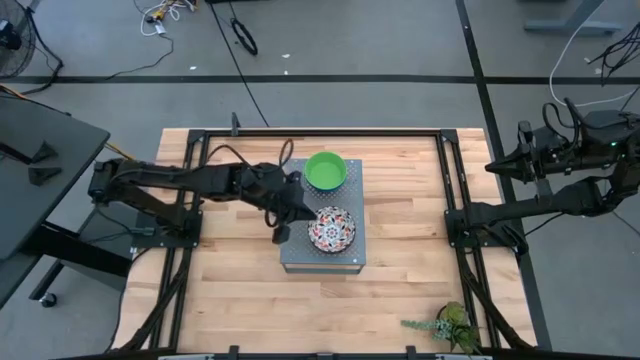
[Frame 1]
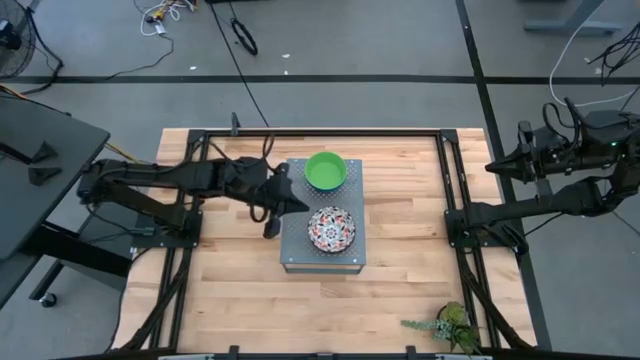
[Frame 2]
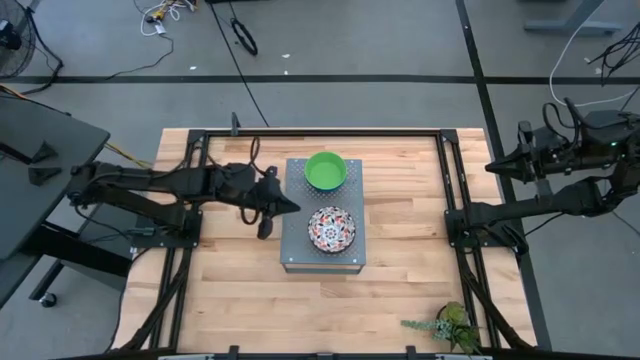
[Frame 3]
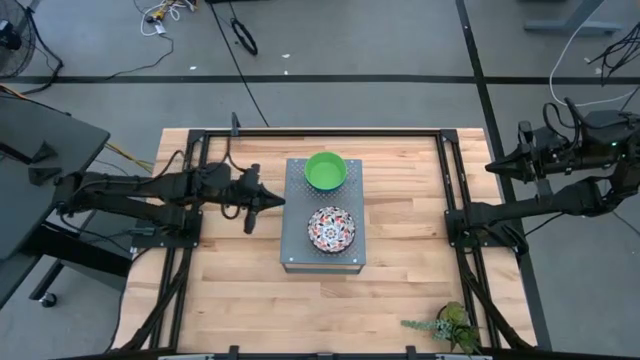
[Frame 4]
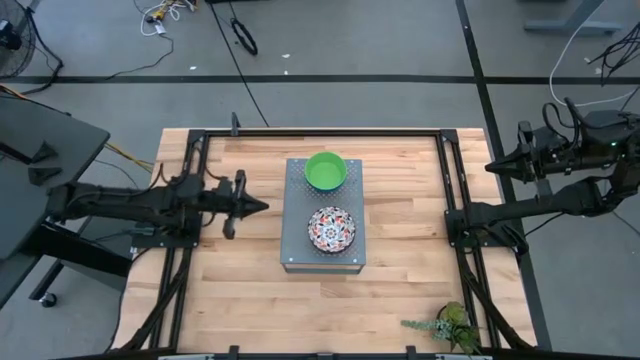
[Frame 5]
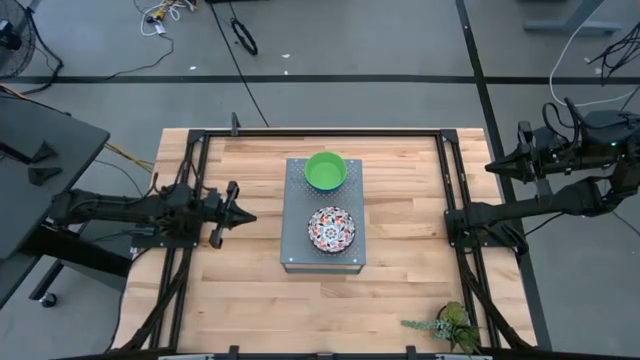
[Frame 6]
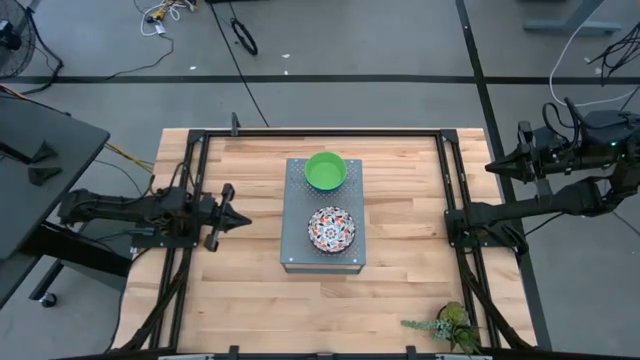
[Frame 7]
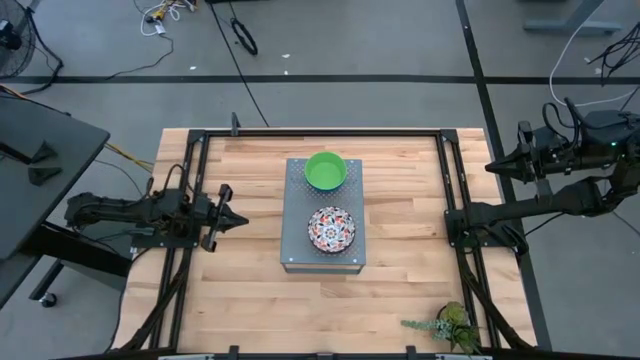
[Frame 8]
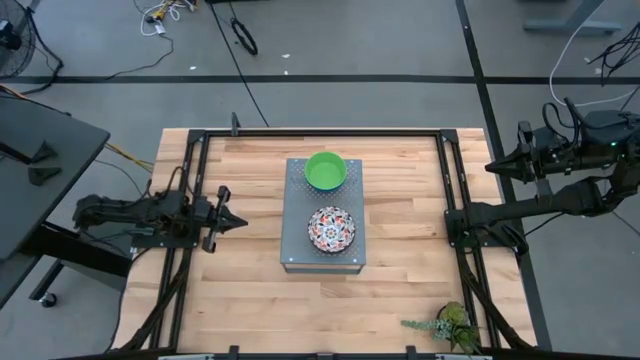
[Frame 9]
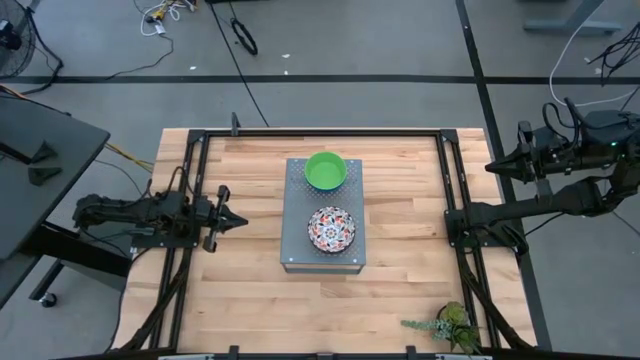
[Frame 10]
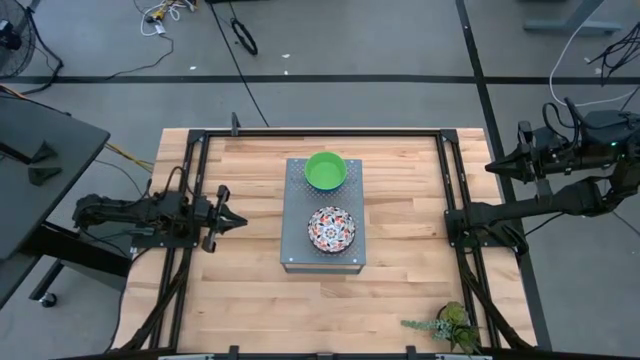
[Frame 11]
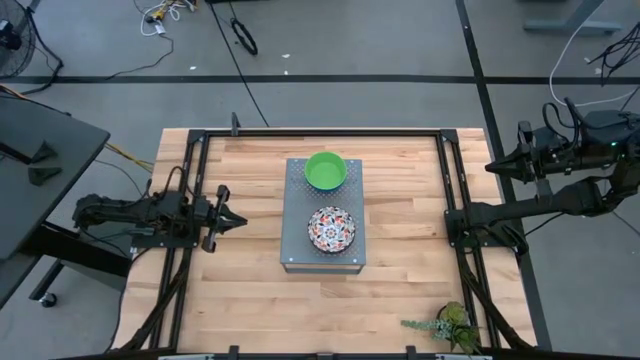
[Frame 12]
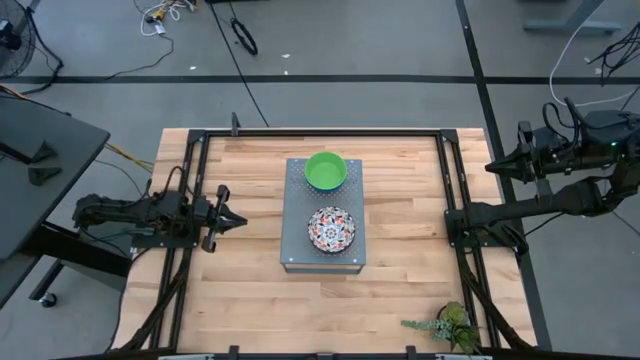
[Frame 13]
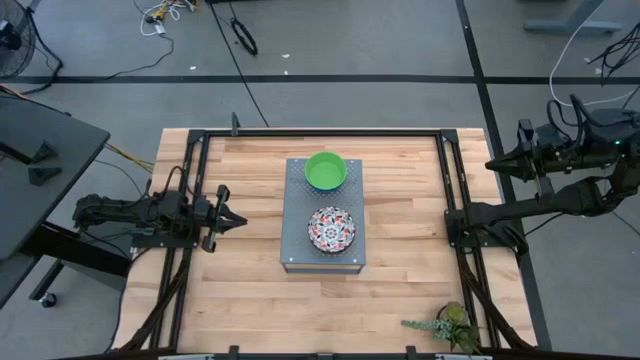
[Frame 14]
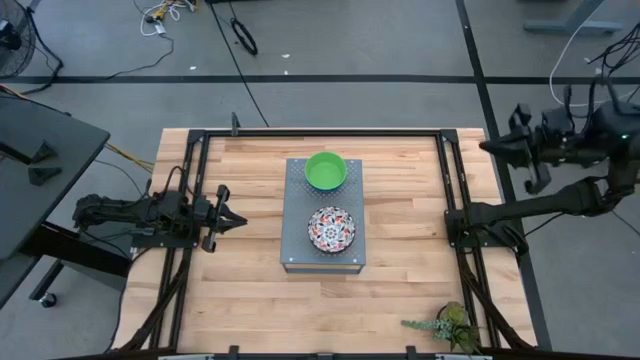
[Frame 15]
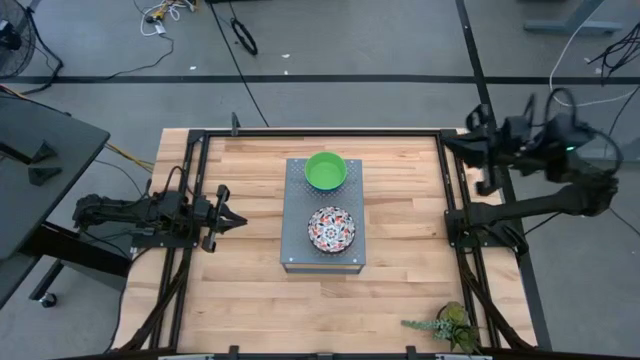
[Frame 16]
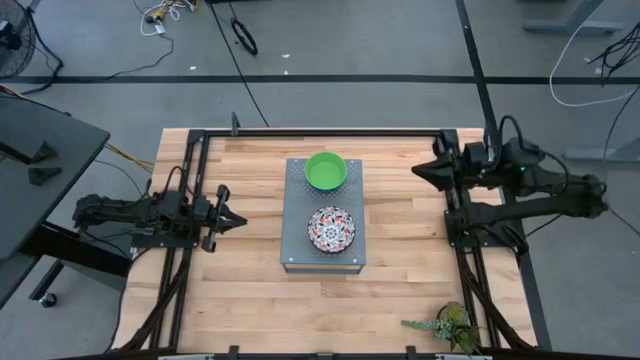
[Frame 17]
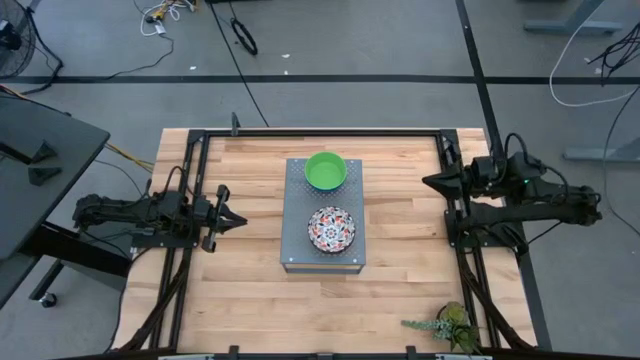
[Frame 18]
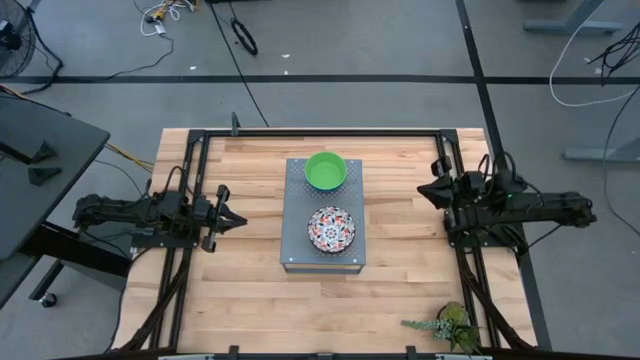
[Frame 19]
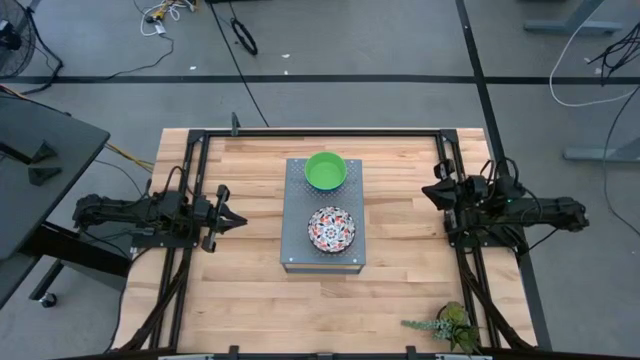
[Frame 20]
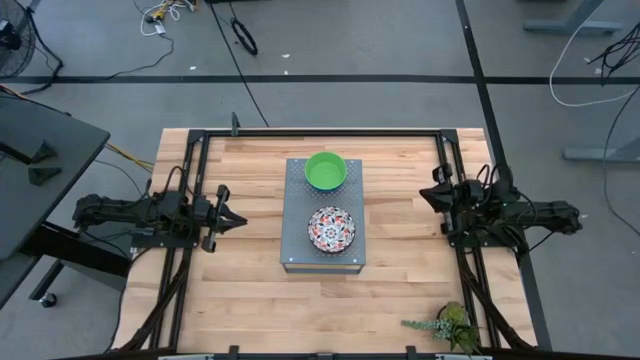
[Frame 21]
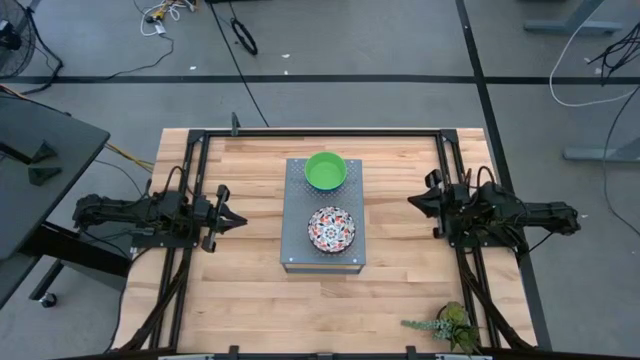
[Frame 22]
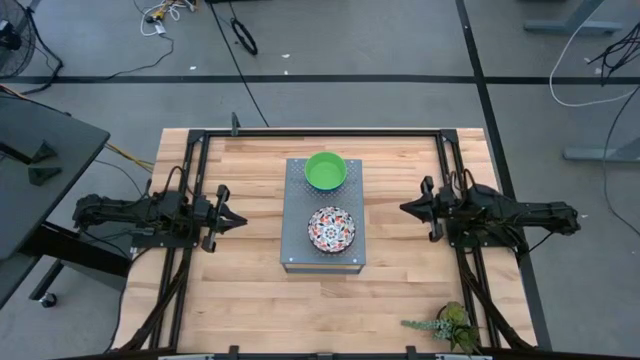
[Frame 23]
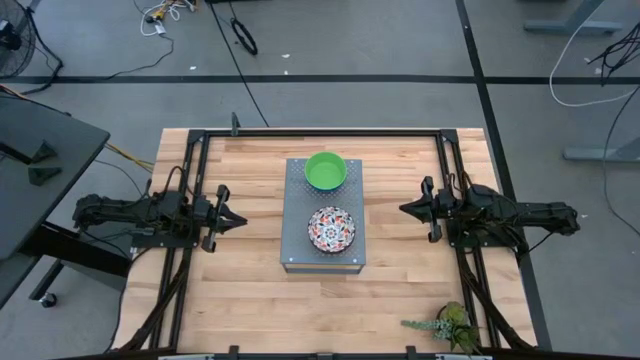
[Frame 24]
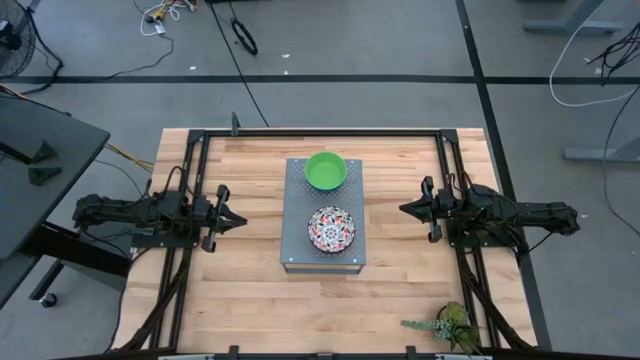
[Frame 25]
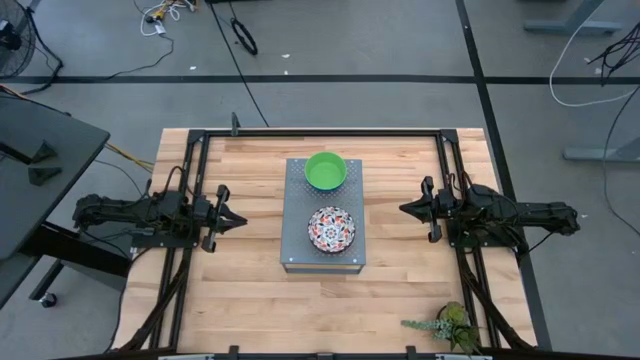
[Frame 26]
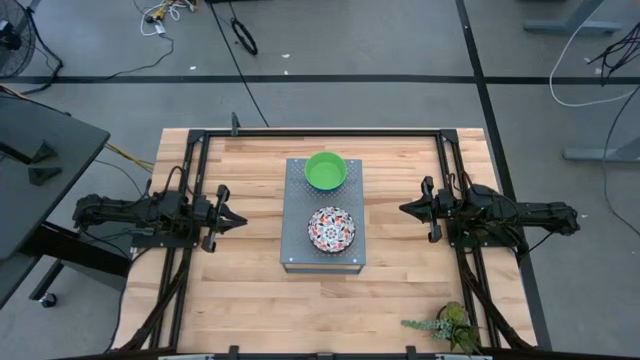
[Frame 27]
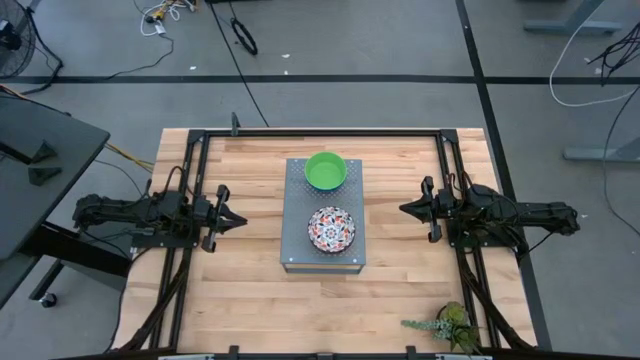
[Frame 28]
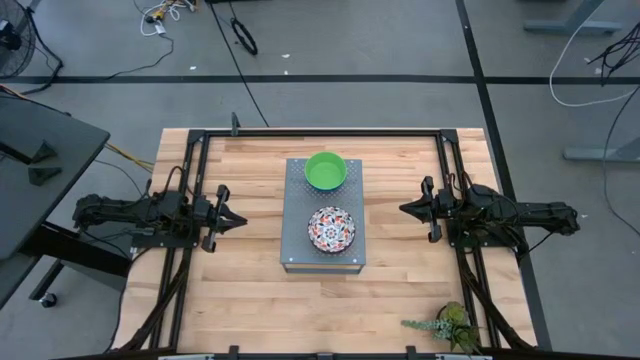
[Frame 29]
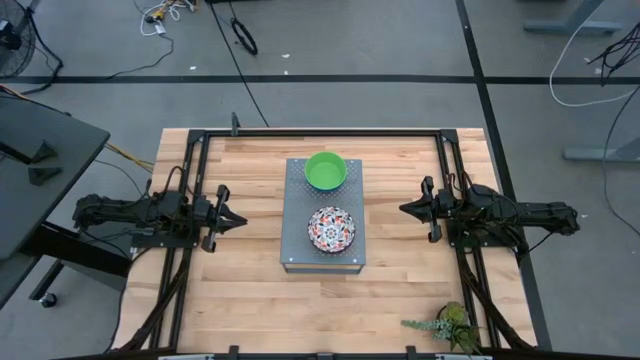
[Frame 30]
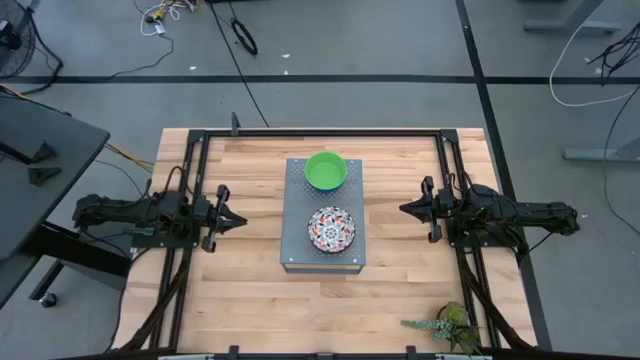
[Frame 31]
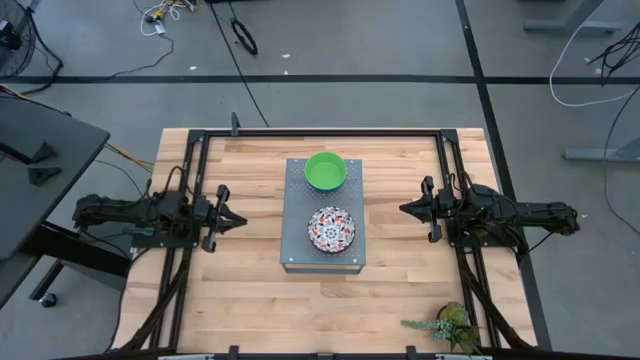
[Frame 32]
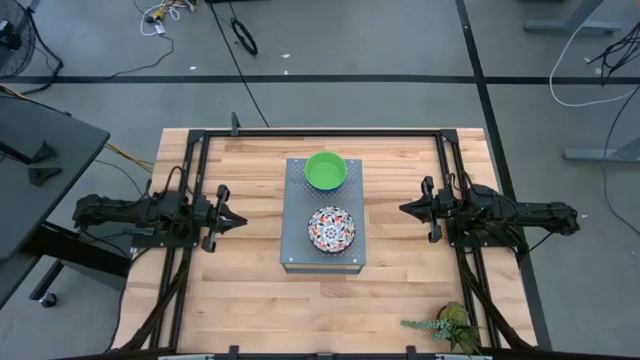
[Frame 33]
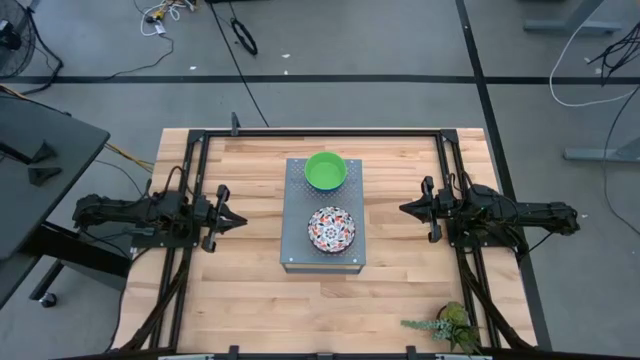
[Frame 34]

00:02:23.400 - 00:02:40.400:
Task: Pick & Place Mini bowls
Return to Home Position

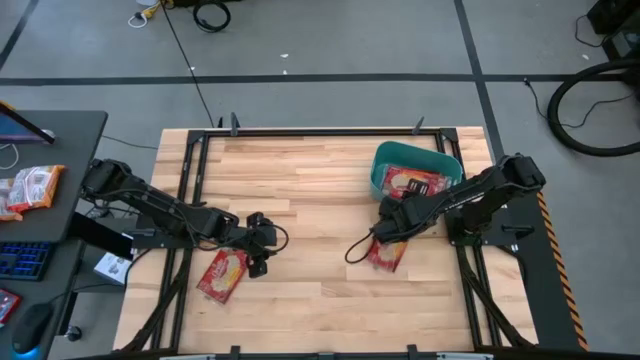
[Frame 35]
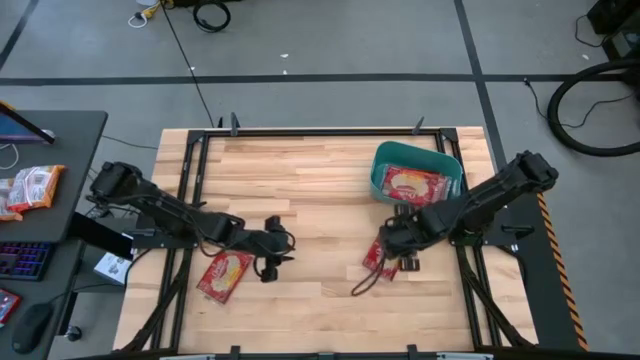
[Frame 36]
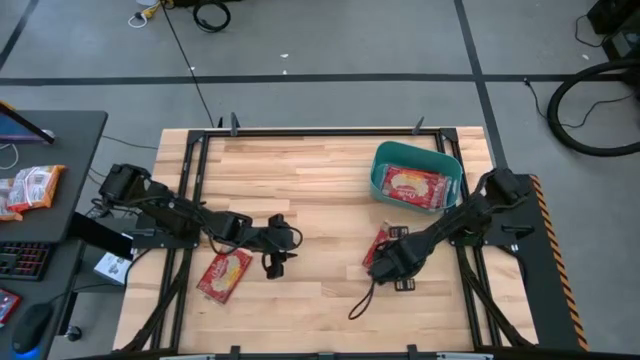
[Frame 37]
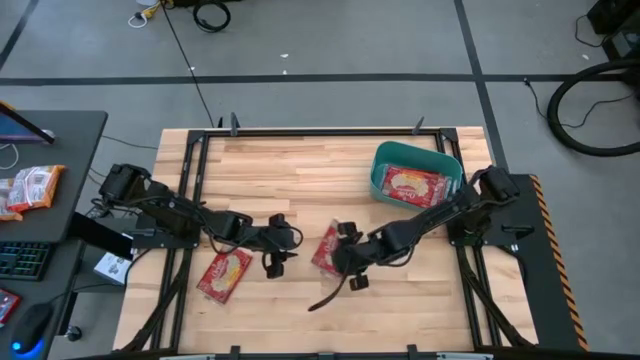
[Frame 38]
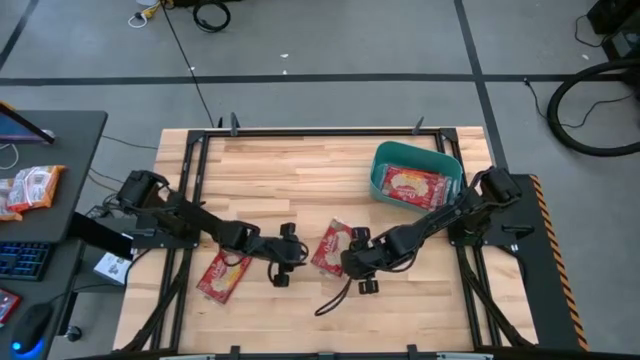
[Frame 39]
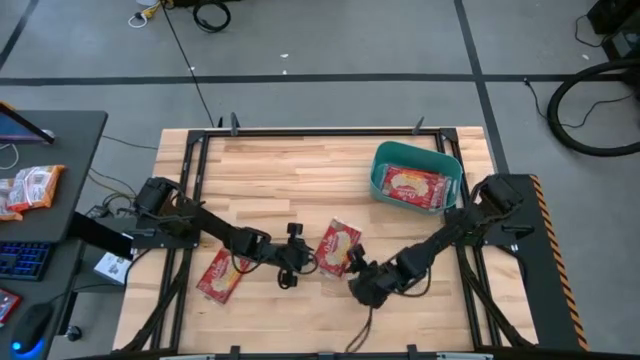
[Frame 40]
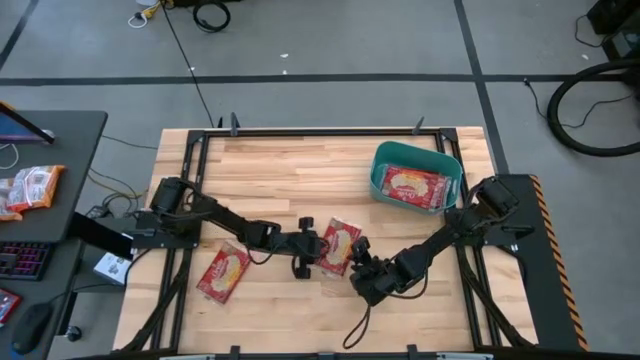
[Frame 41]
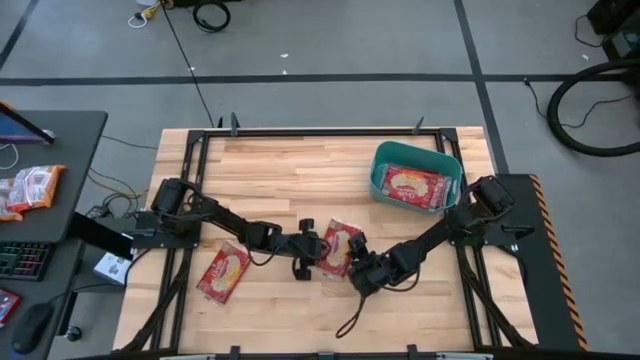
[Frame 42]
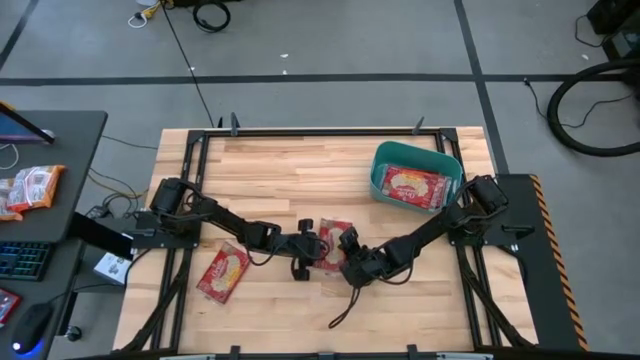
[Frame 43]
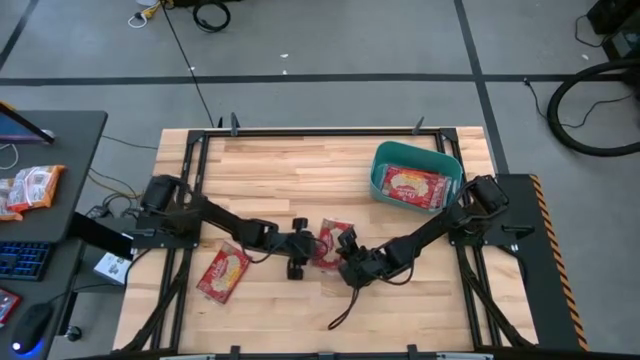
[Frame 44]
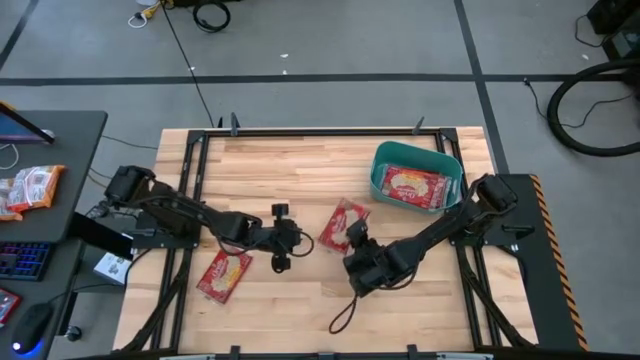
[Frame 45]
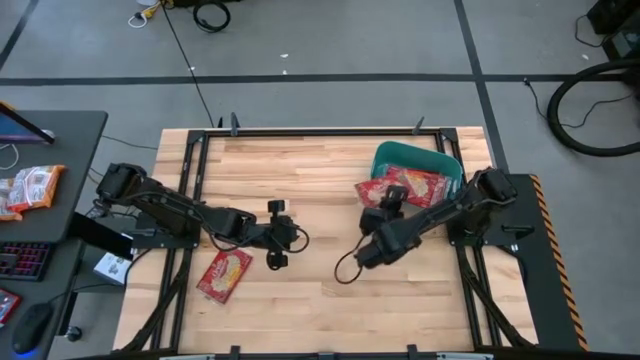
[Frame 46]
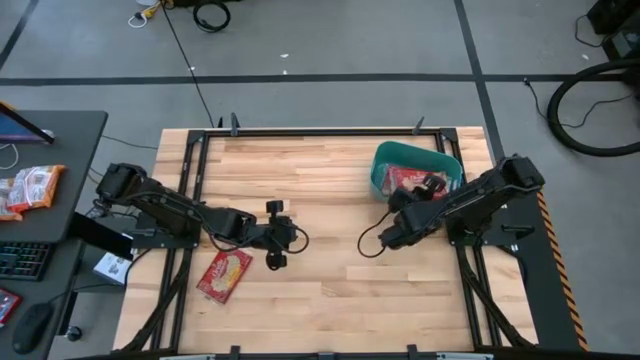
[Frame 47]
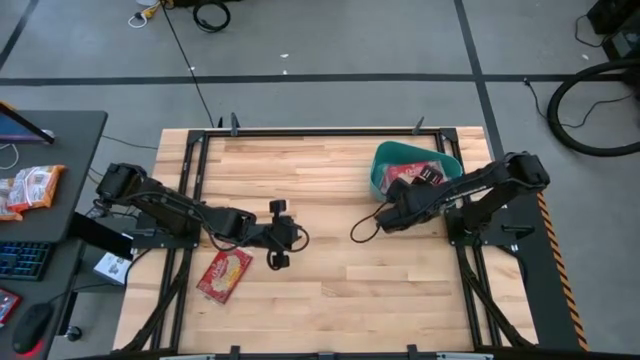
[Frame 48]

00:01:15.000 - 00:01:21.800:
Task: Sort popcorn bags into baskets
Put the red popcorn bag into the green container
